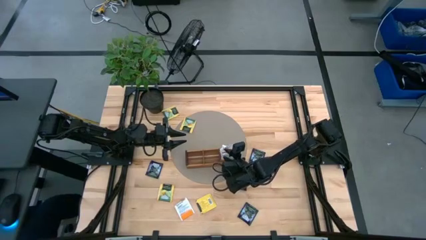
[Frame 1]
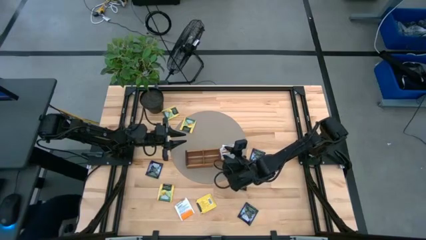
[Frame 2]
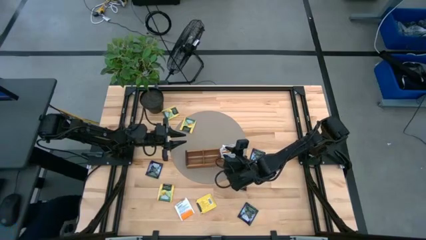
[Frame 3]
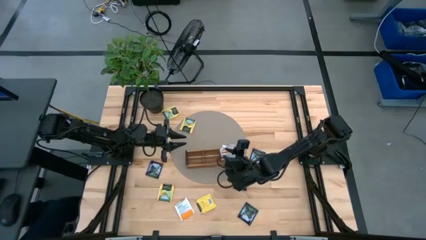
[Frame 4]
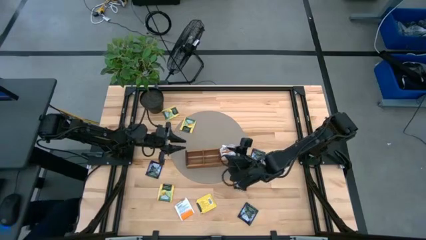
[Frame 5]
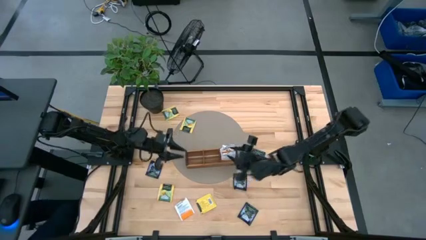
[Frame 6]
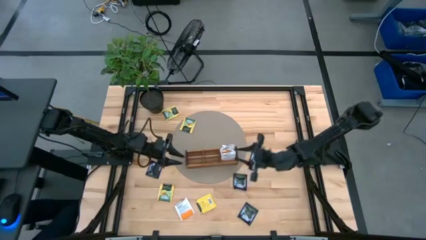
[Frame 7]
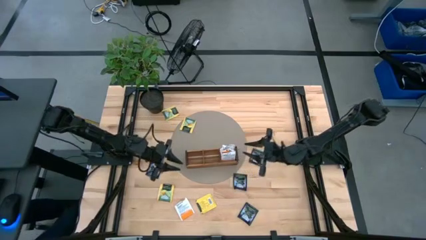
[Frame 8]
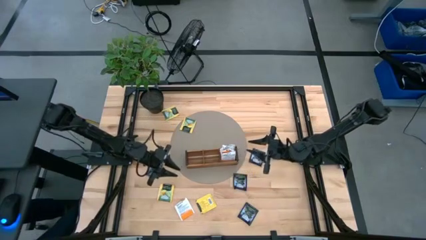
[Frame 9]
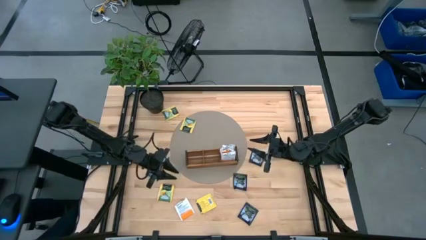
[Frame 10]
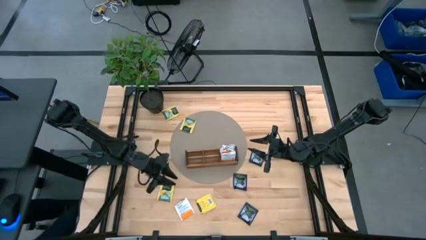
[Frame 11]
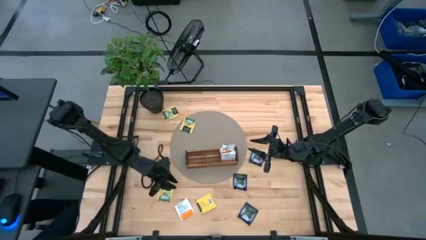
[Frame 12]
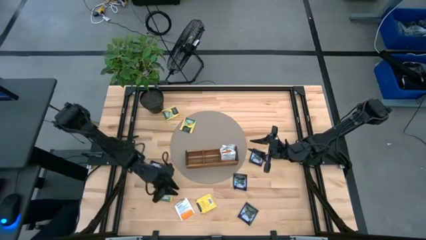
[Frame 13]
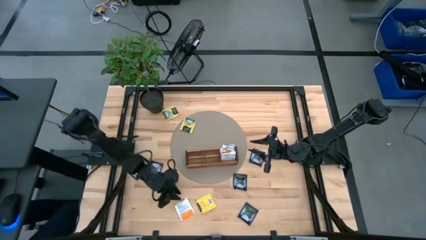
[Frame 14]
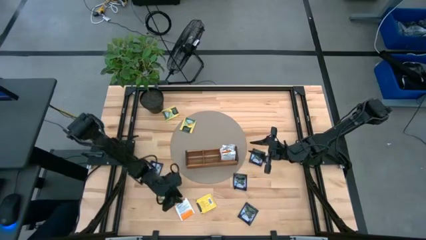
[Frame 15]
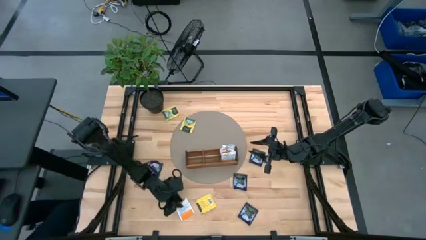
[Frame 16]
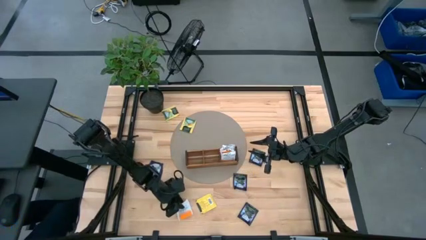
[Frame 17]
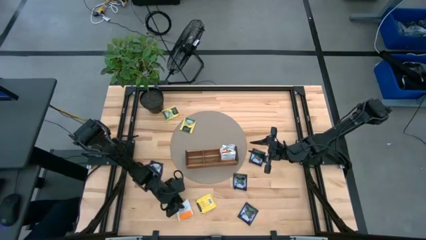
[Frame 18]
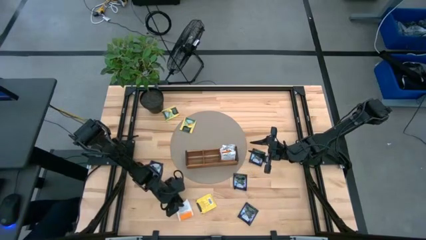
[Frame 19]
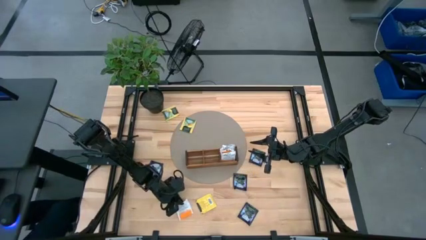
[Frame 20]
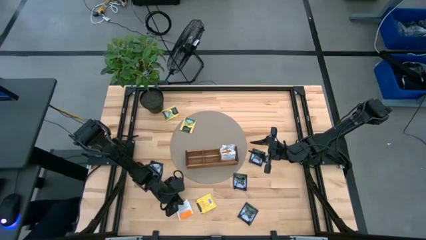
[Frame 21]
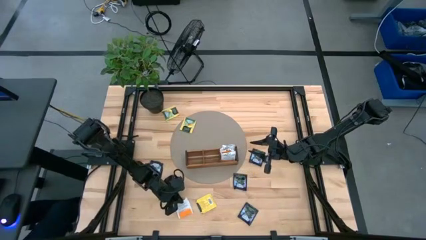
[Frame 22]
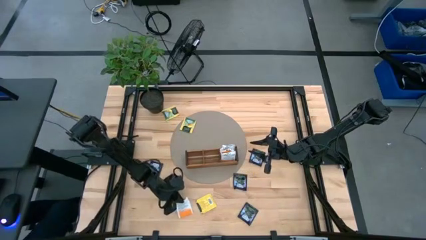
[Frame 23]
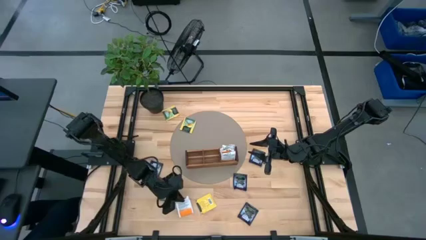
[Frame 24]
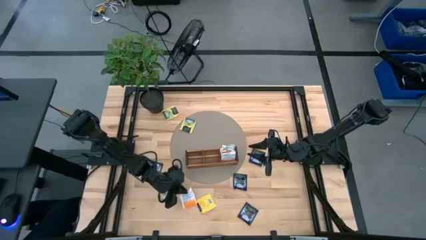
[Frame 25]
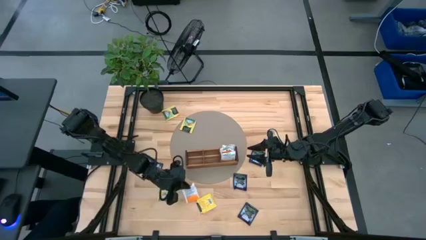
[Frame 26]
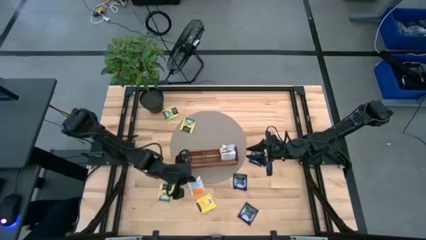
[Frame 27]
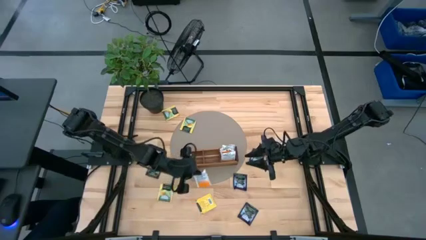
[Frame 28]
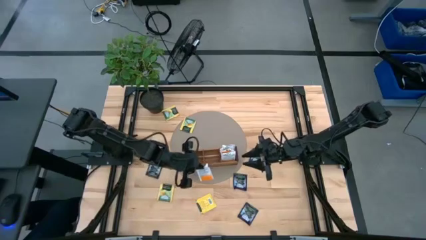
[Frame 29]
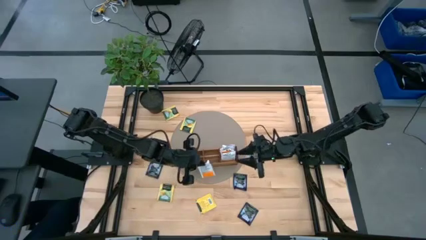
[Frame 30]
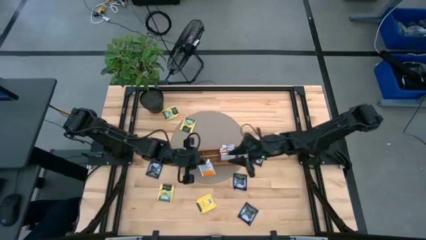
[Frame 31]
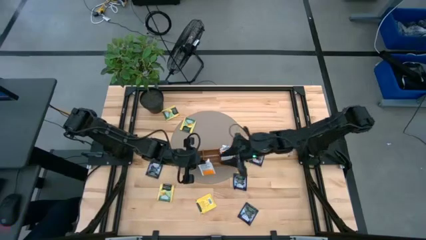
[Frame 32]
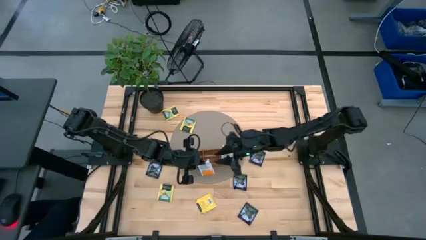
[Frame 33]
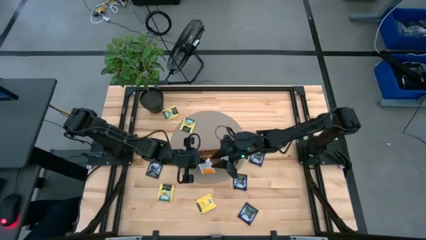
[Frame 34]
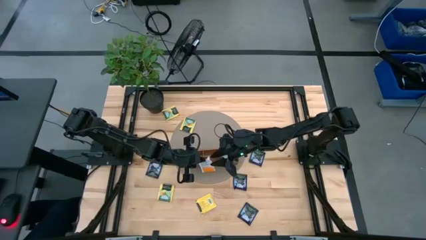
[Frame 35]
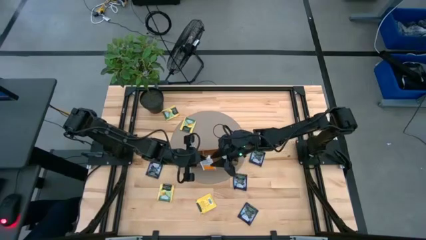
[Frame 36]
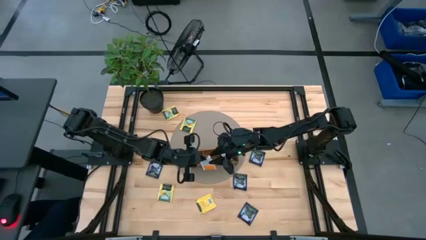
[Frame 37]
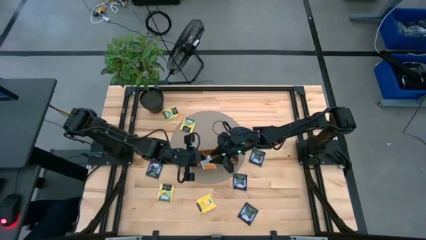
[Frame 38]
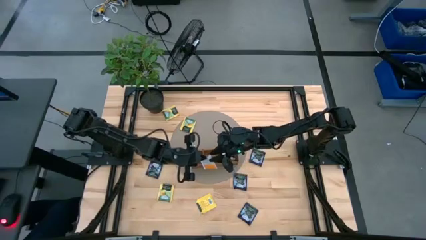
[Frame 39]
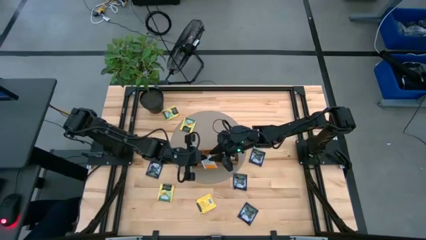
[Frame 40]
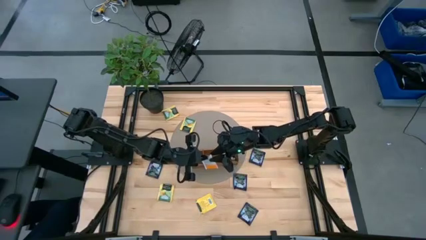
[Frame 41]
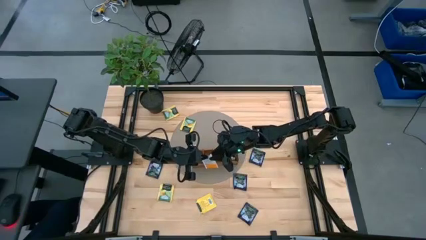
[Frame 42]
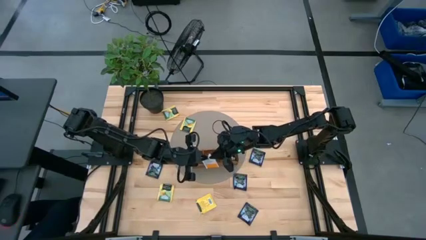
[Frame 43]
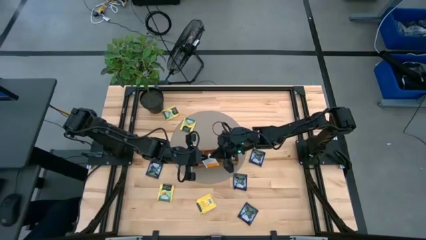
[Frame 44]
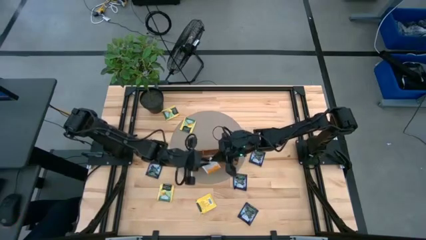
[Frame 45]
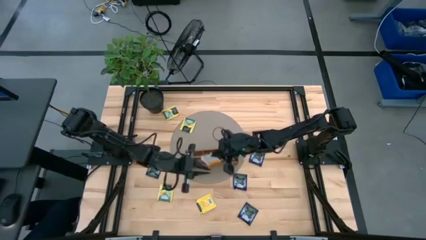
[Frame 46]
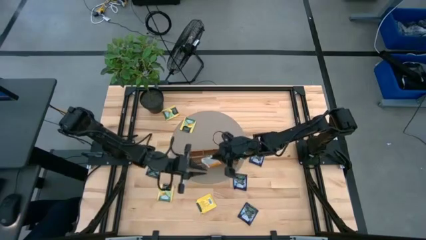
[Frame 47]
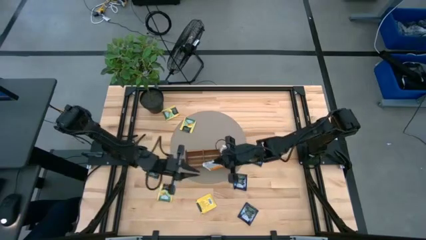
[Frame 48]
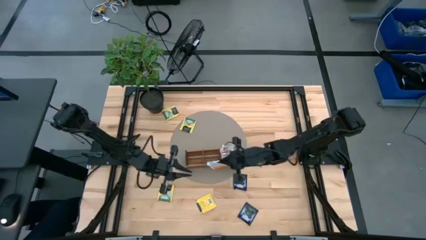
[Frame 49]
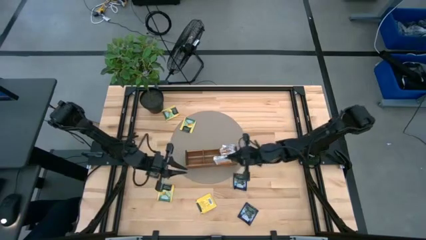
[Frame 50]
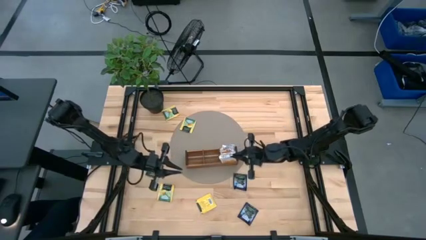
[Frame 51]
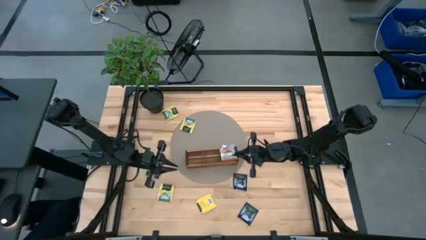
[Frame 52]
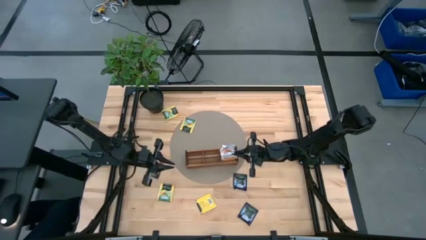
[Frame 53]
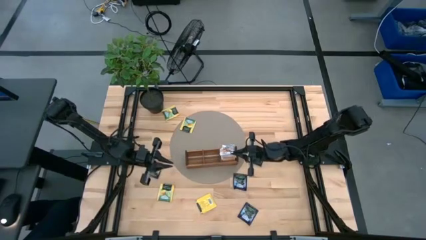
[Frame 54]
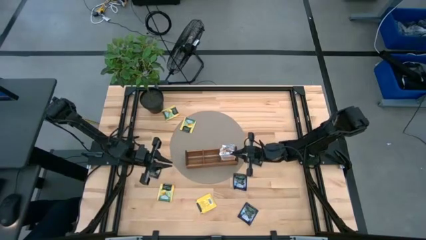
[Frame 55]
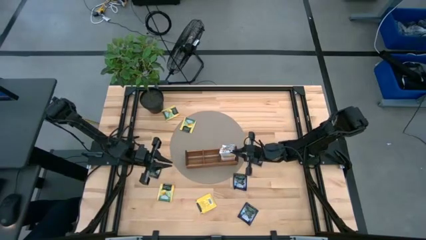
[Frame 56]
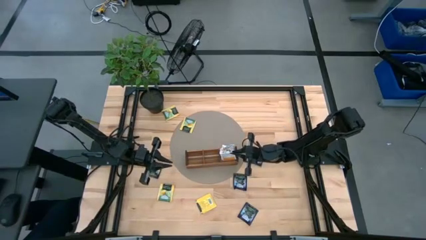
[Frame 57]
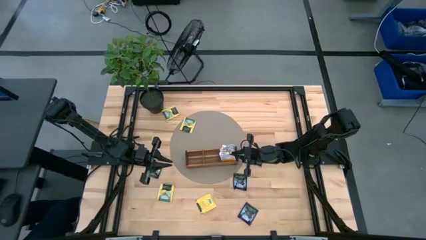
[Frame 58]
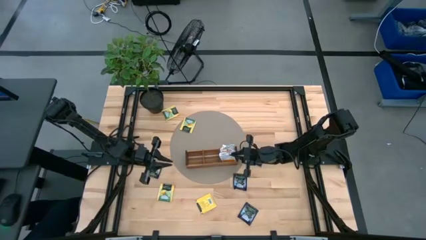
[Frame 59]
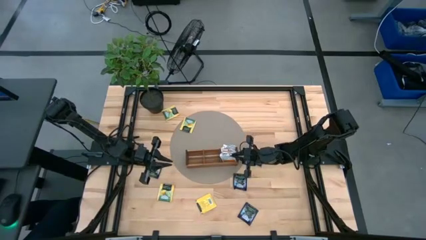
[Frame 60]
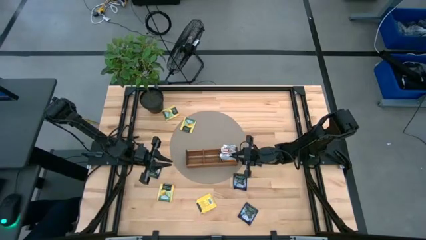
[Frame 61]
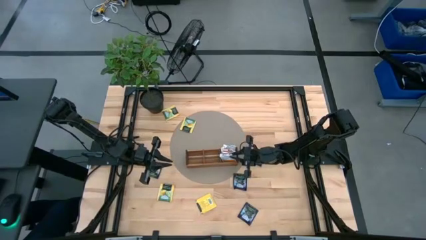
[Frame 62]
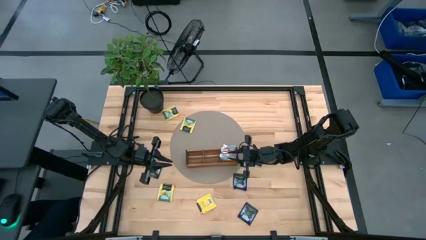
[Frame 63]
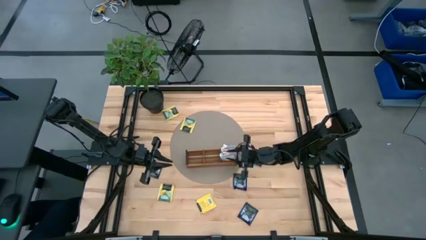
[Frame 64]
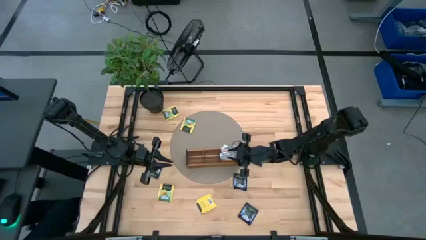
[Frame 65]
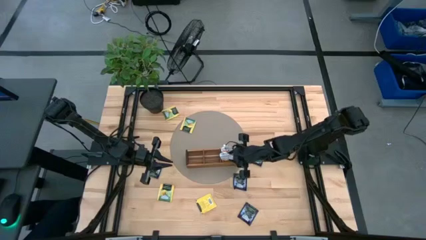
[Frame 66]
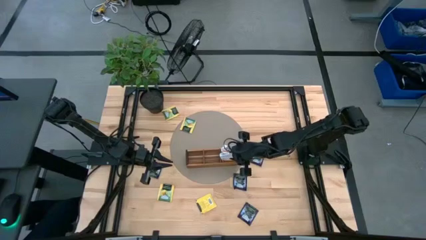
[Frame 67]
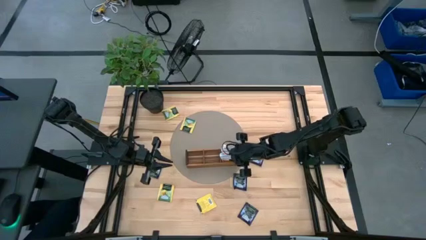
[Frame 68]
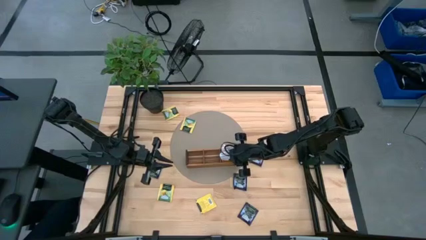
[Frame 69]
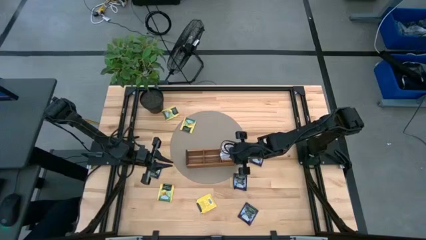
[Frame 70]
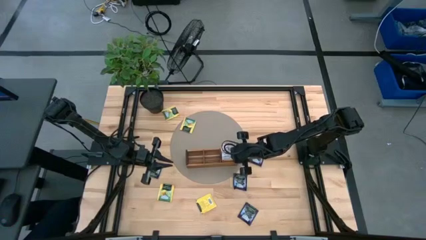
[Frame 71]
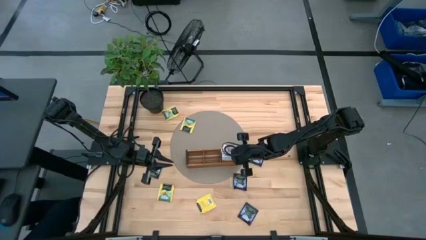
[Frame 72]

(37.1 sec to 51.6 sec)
Task: Pick & Place Tea
Put the white tea bag into the right section of the wooden organizer

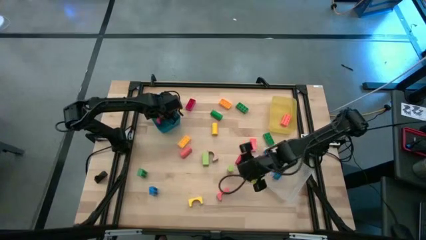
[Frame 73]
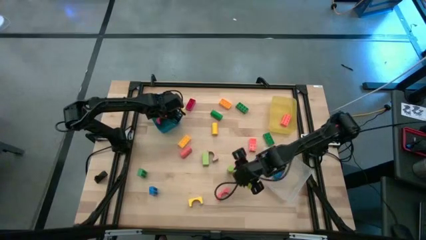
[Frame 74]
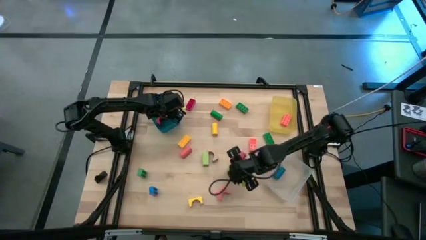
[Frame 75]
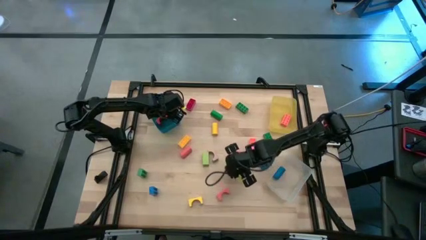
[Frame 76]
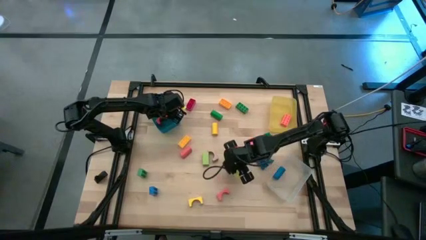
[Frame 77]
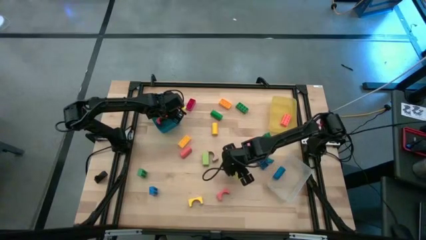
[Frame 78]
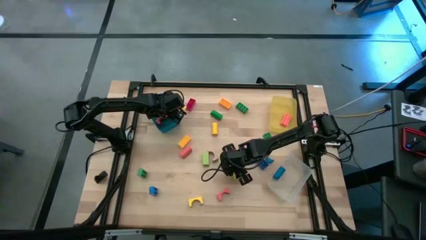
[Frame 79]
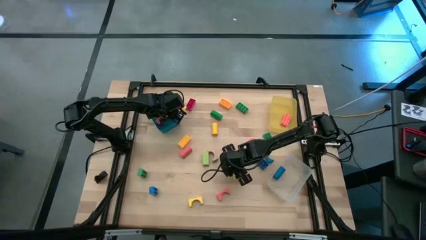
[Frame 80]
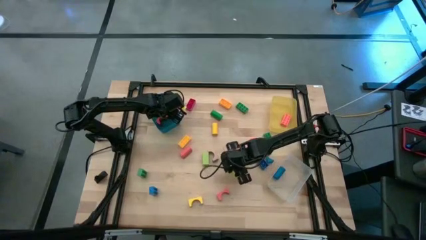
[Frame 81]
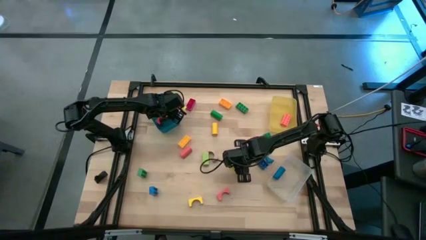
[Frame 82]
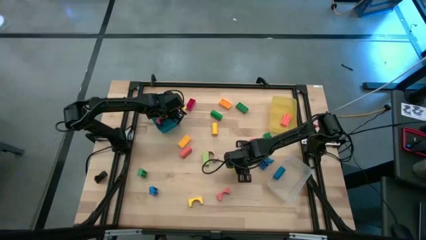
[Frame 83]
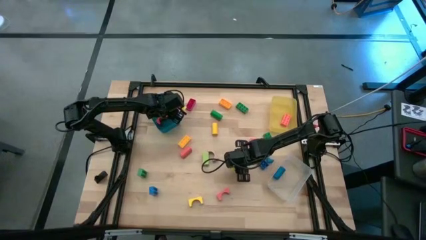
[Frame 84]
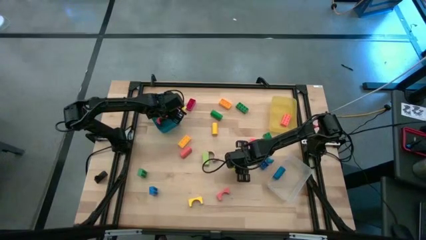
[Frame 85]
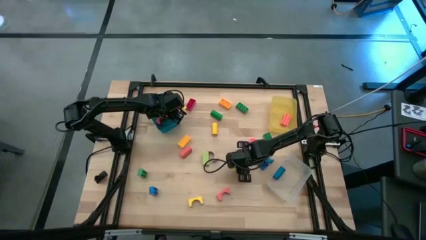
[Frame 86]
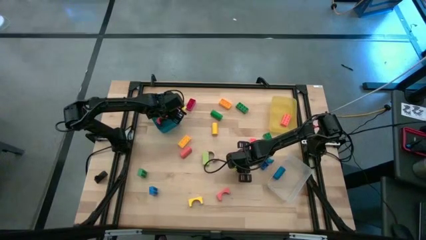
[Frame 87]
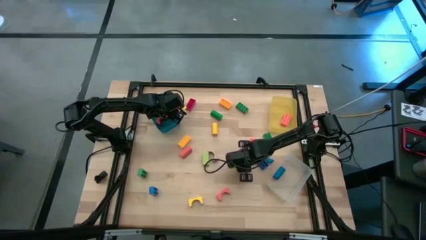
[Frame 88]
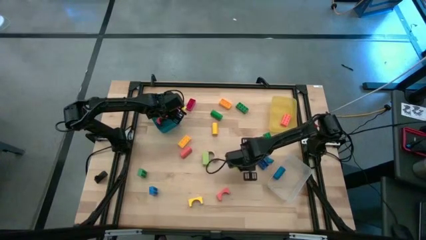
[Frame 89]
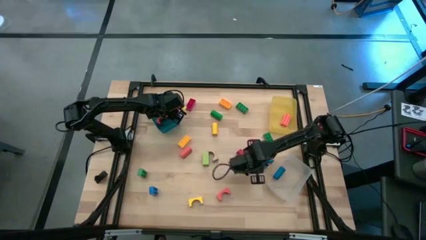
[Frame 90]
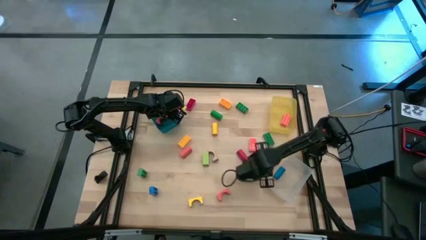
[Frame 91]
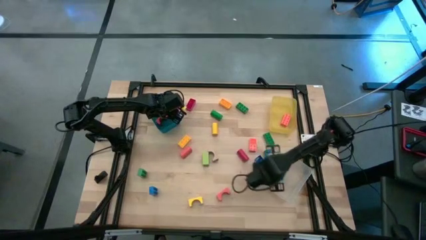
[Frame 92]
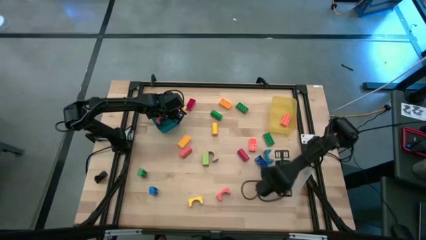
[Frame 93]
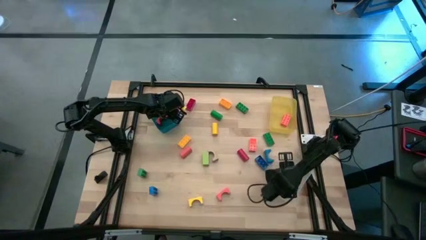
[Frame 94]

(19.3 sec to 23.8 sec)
Task: Sort blocks by size
Put the light green cylindrical block into the transparent bin
